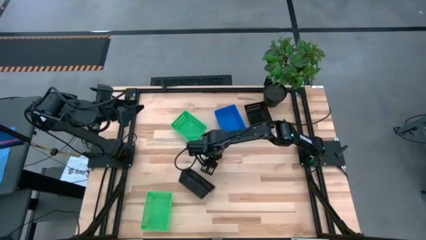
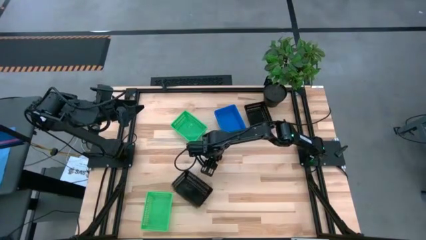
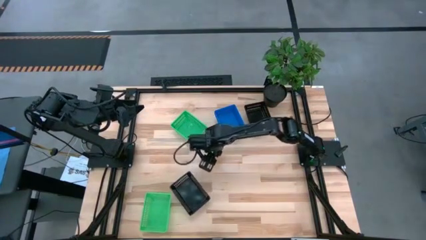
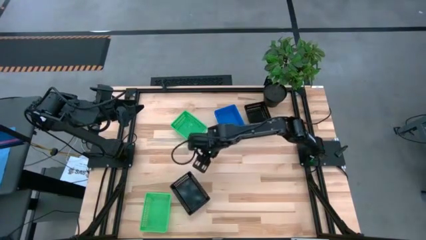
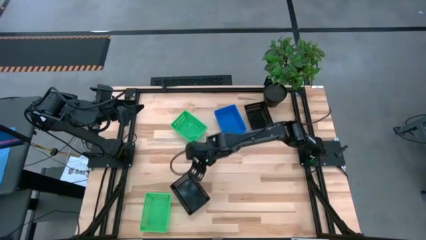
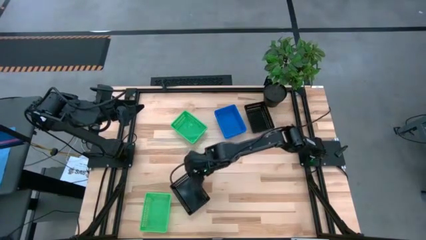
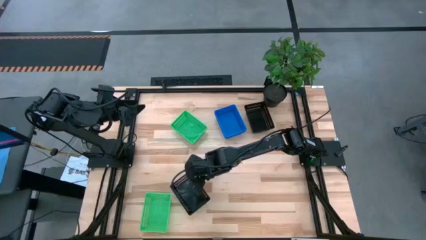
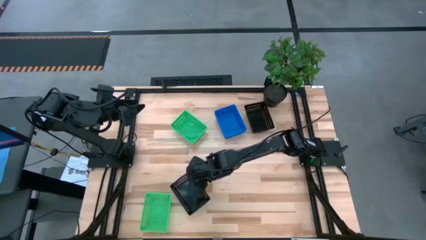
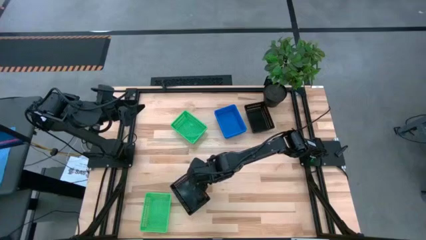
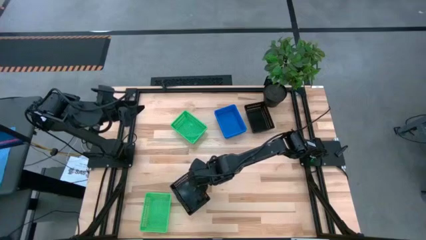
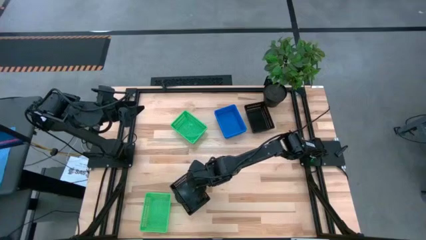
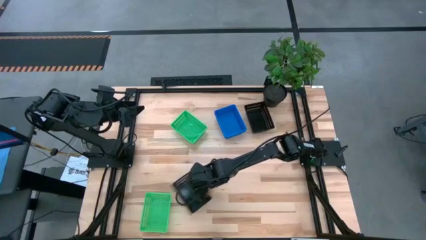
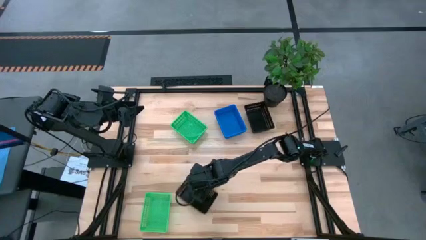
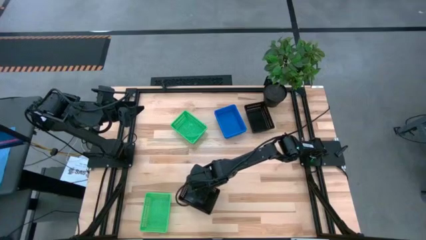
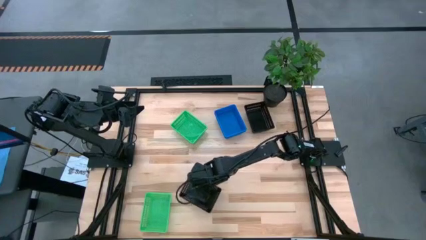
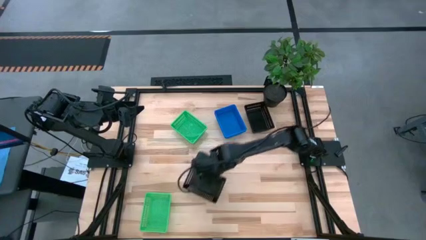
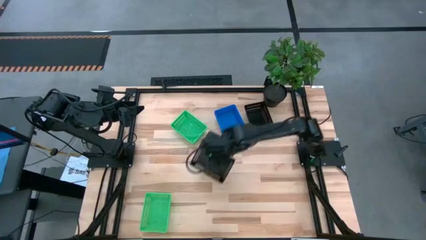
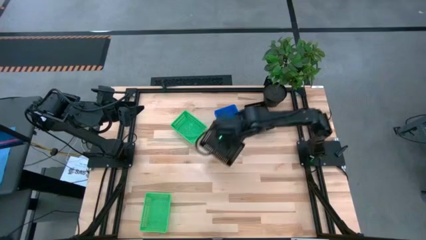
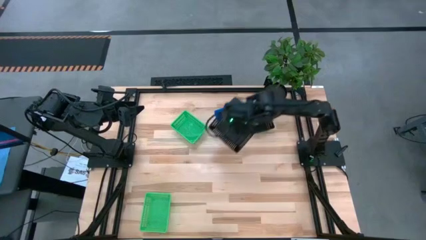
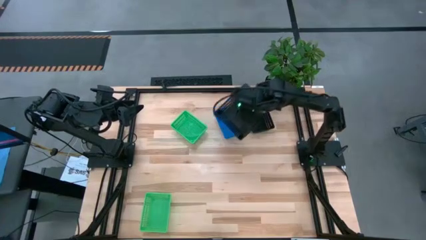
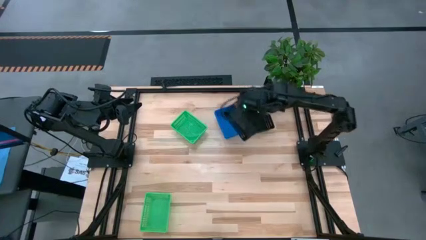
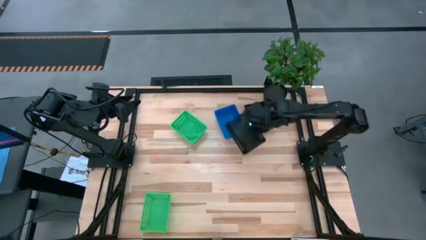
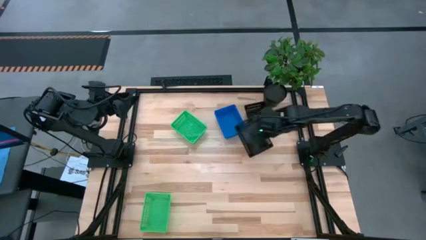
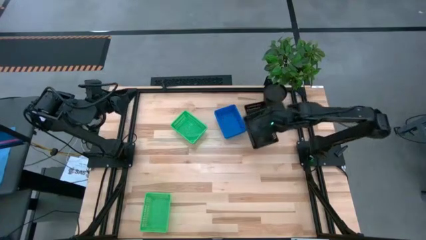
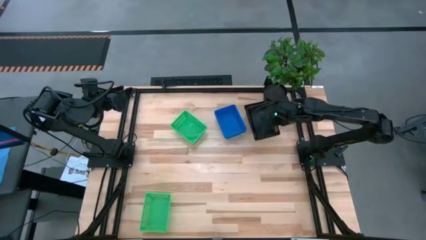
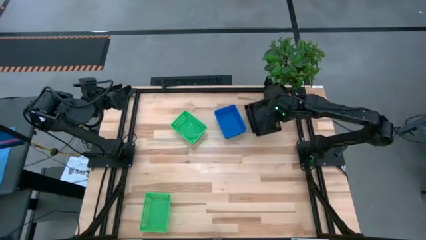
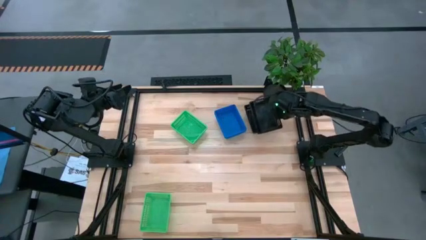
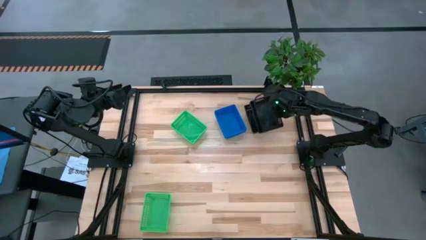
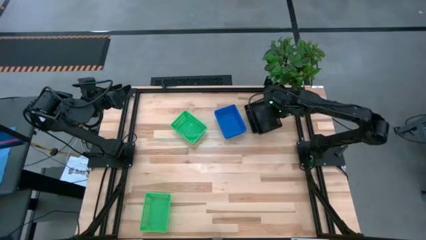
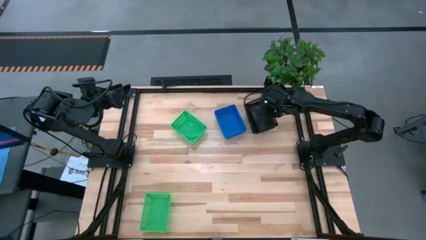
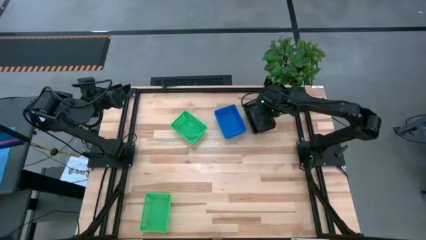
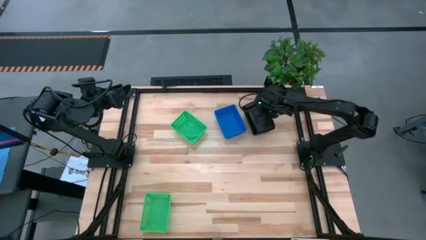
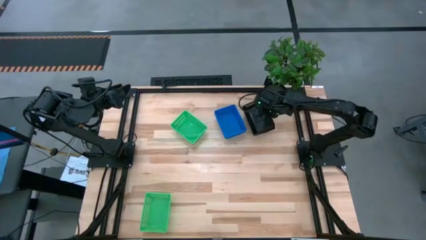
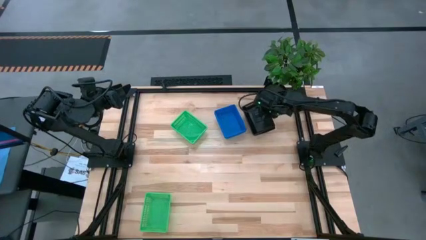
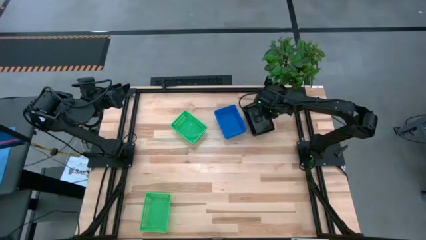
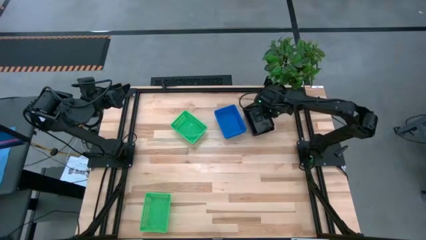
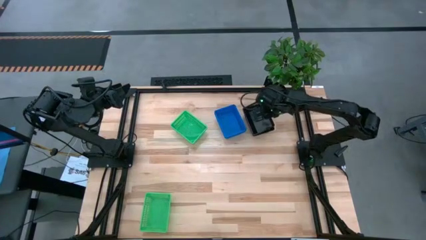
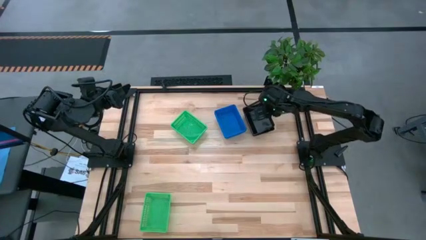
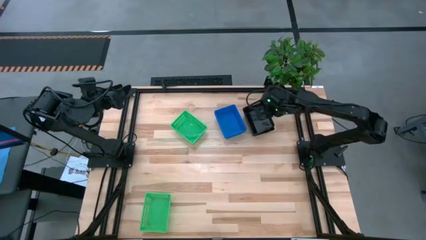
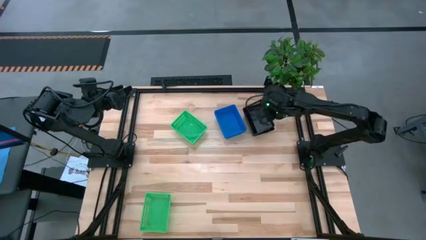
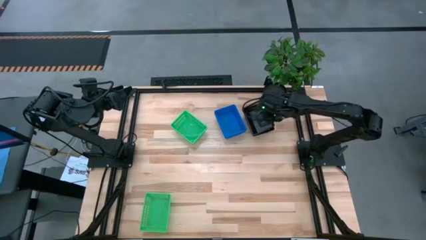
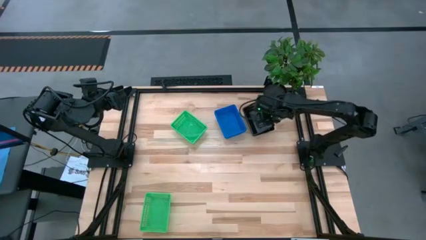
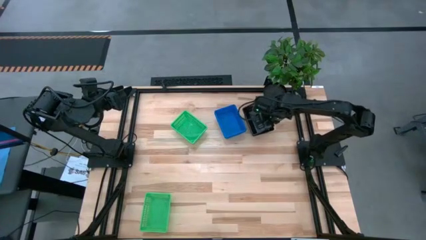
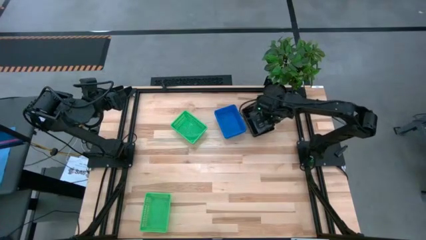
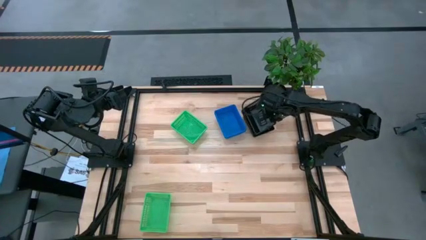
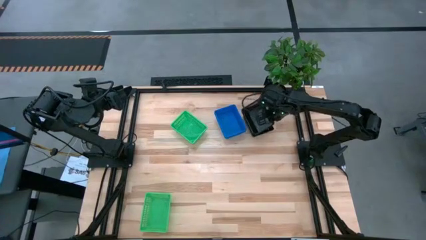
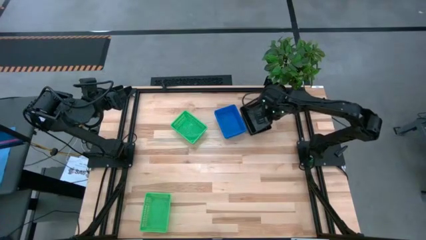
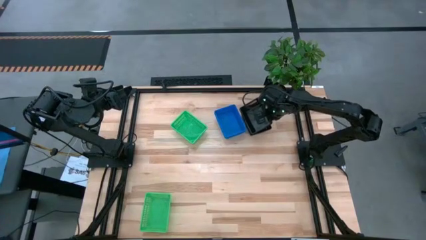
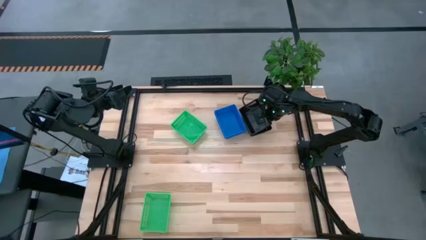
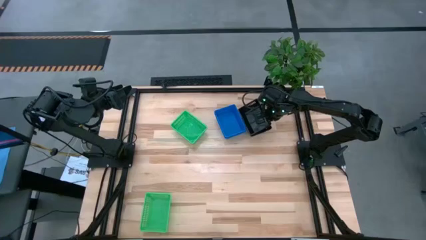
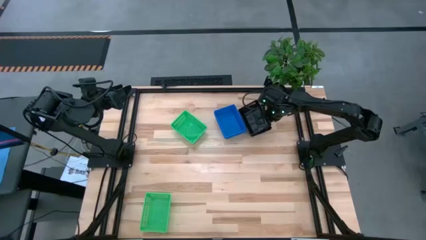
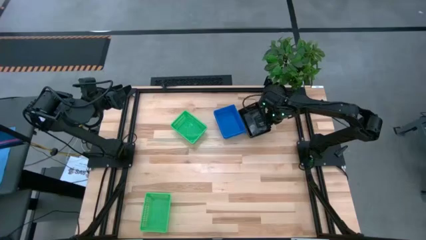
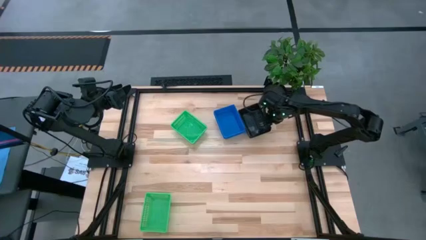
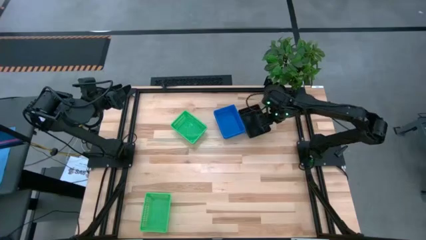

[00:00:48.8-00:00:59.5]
Stack the bottom black bin on top of the top black bins
